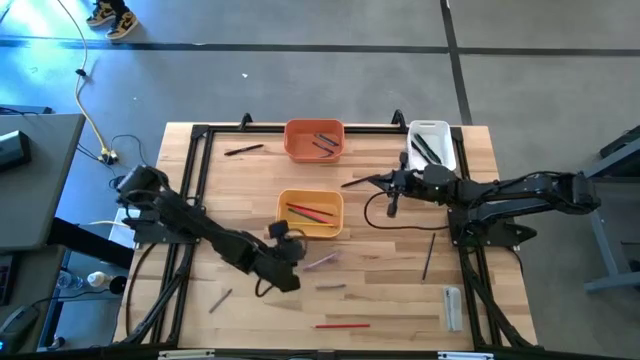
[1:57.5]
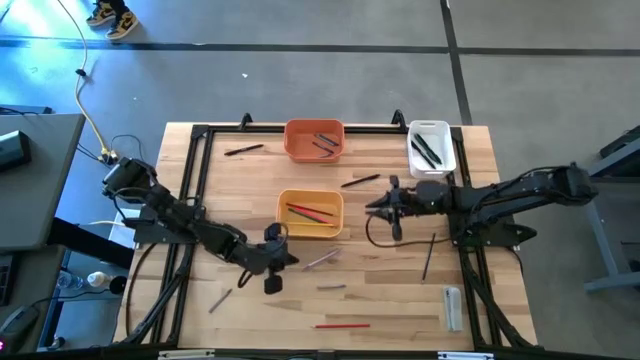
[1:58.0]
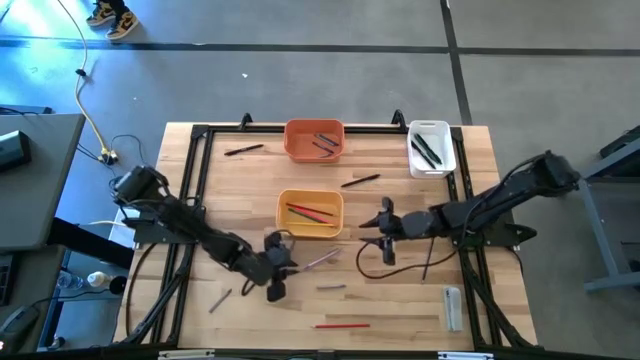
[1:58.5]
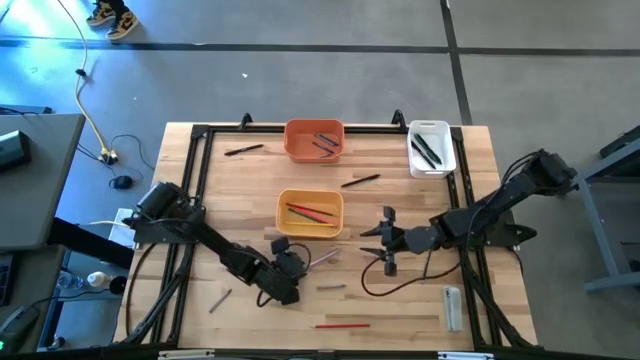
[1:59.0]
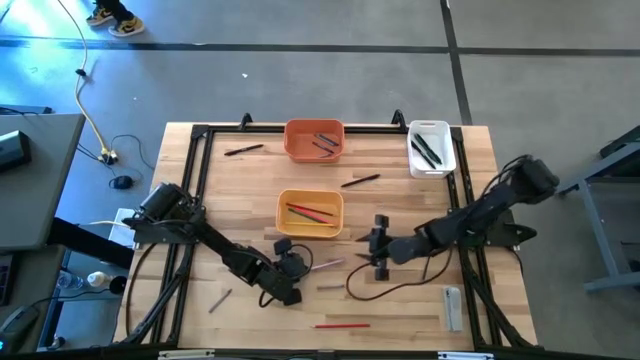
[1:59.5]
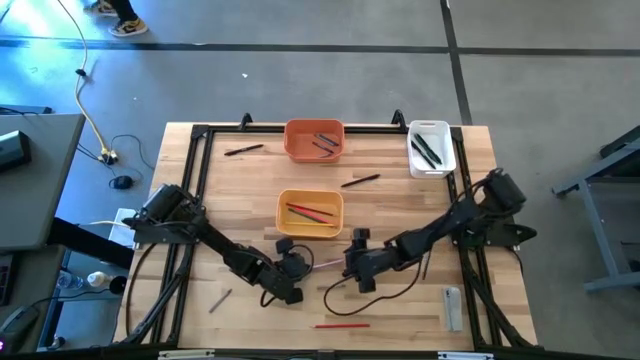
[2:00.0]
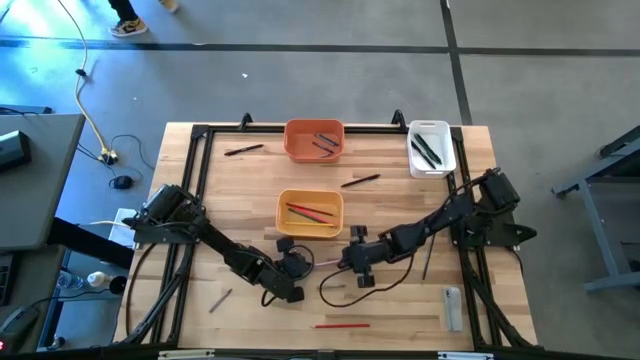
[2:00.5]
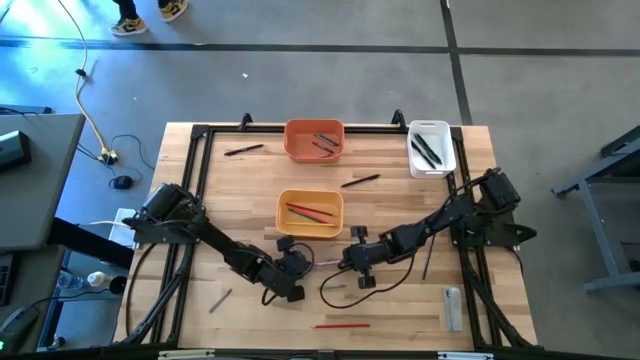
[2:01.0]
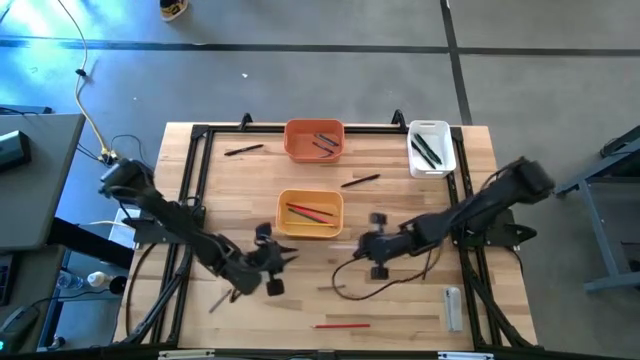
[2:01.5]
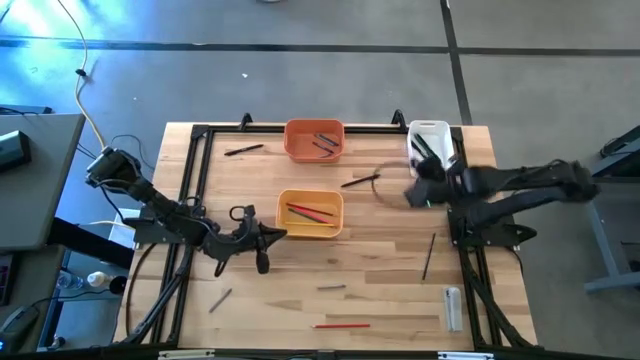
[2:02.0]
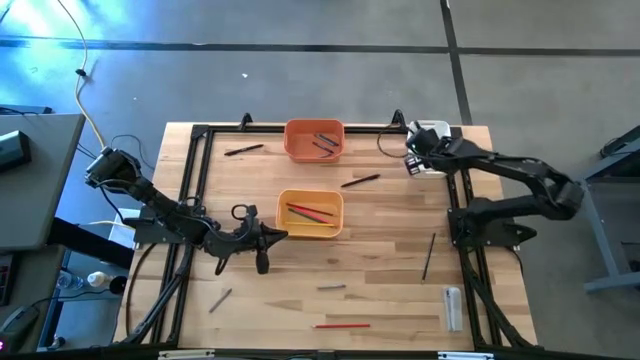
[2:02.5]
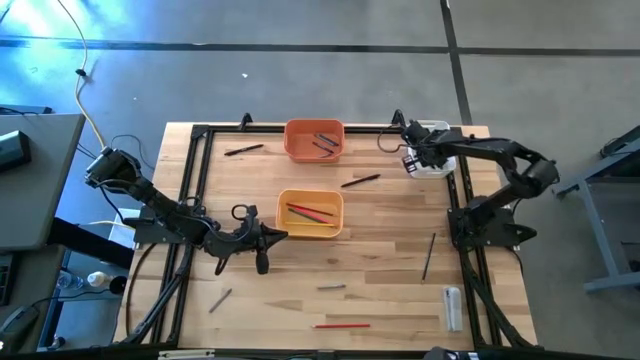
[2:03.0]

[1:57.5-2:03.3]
Task: Sort crayons/erasers/pens/pencils in bins
Put the purple pen into the white bin

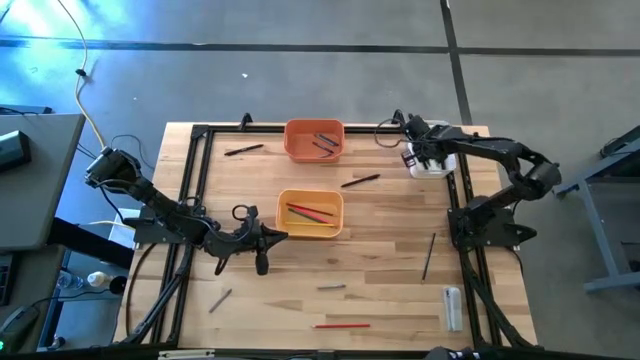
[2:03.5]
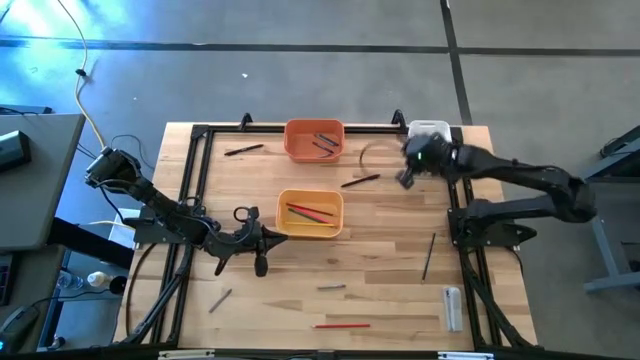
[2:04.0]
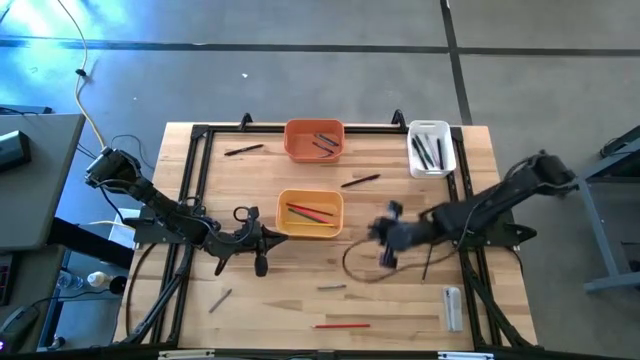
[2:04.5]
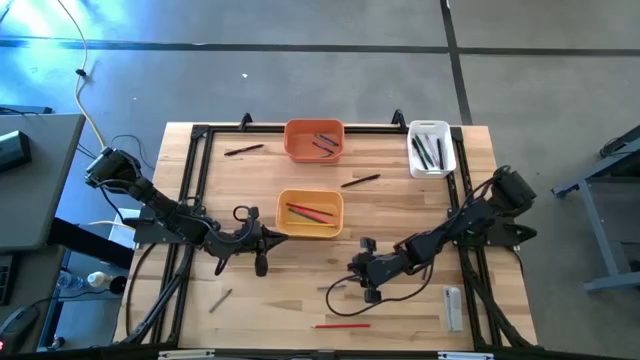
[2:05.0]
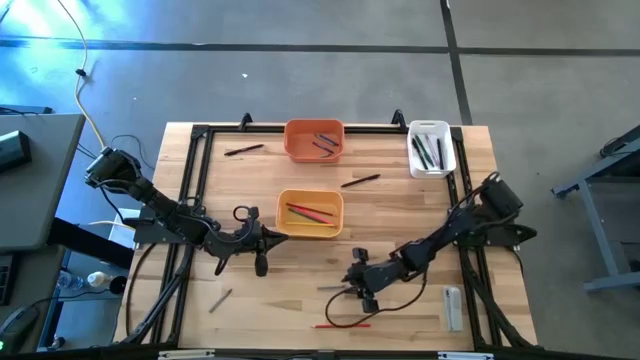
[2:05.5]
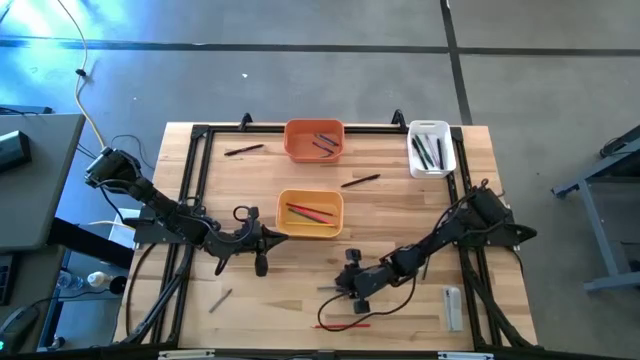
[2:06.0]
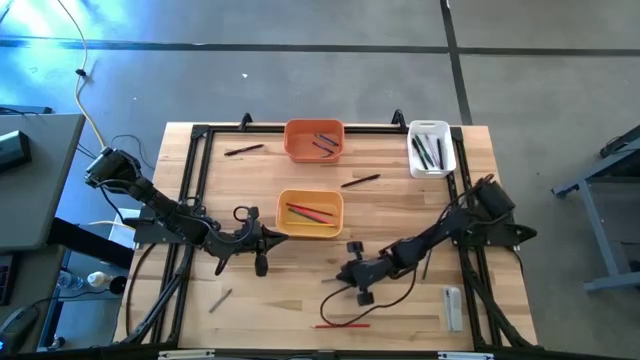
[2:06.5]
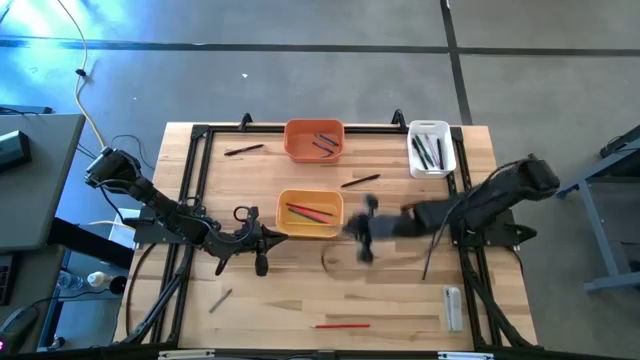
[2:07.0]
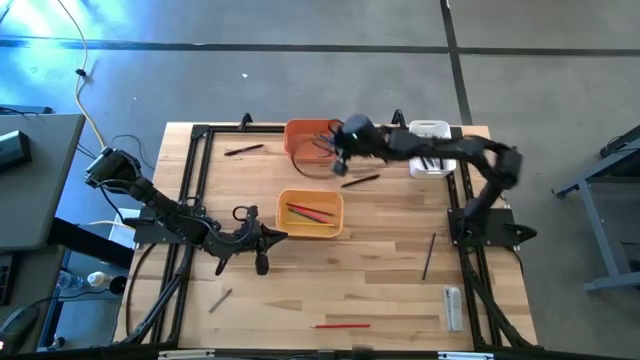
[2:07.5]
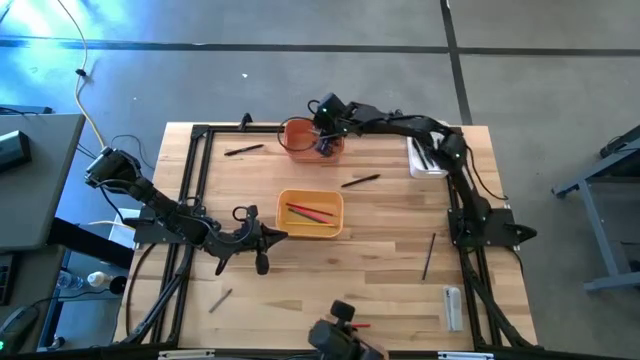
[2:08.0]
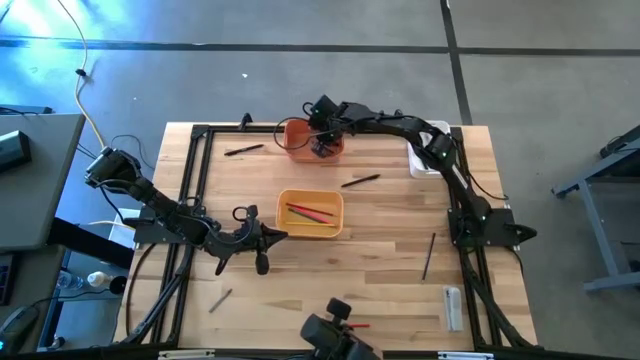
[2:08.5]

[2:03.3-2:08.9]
Put the right gray crayon into the orange bin

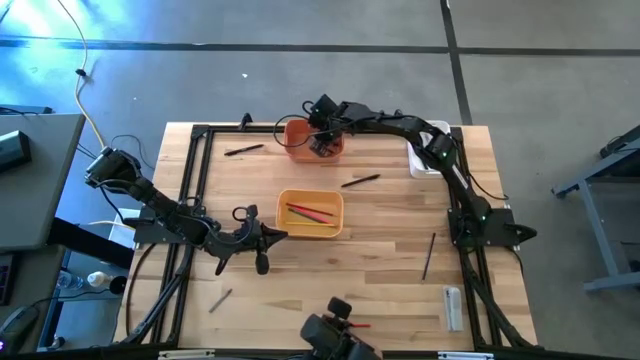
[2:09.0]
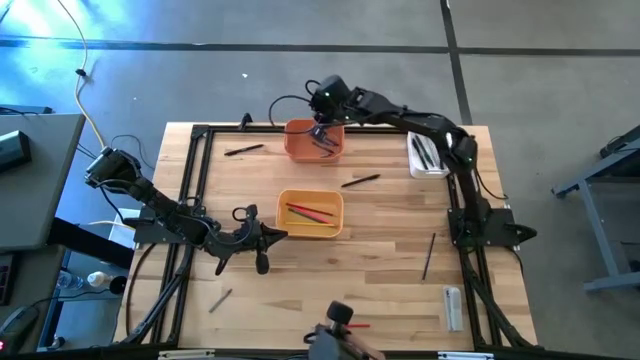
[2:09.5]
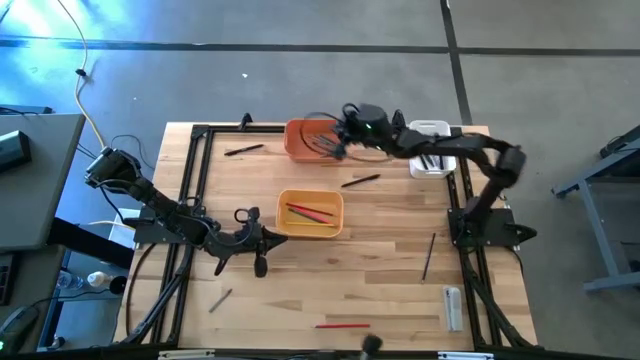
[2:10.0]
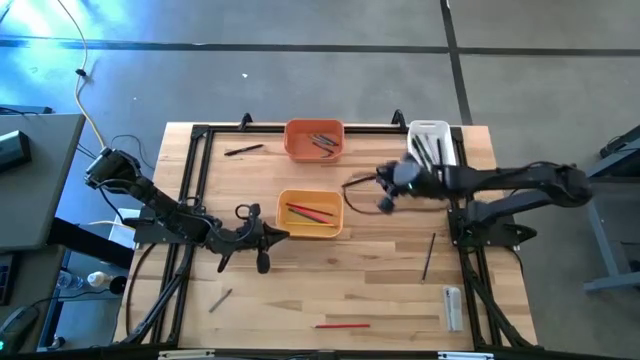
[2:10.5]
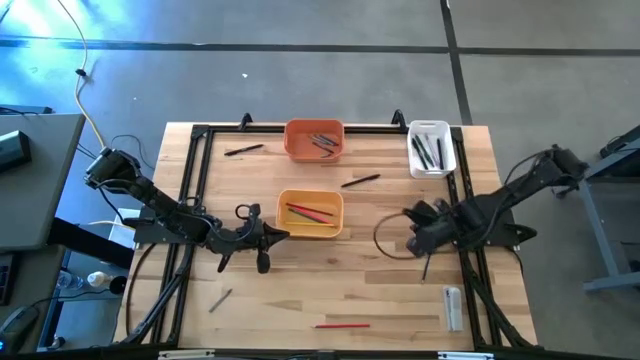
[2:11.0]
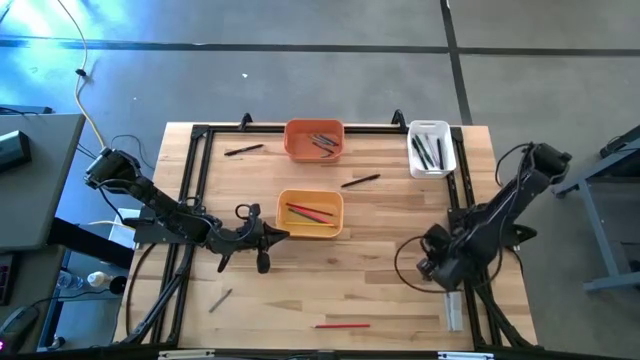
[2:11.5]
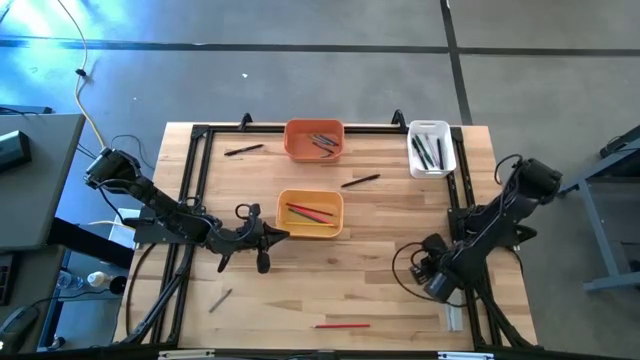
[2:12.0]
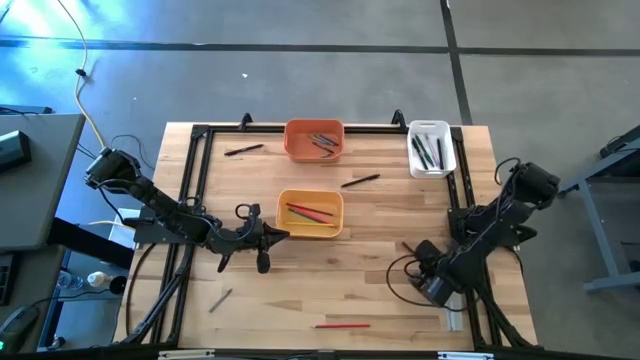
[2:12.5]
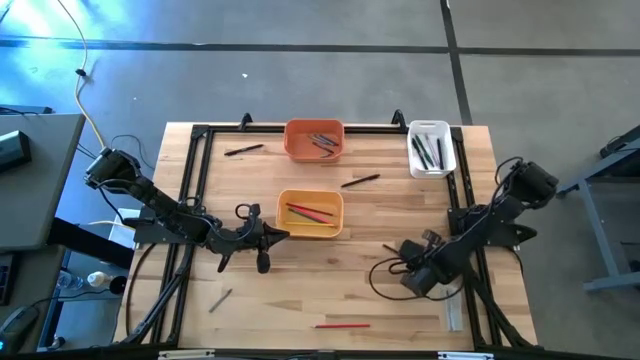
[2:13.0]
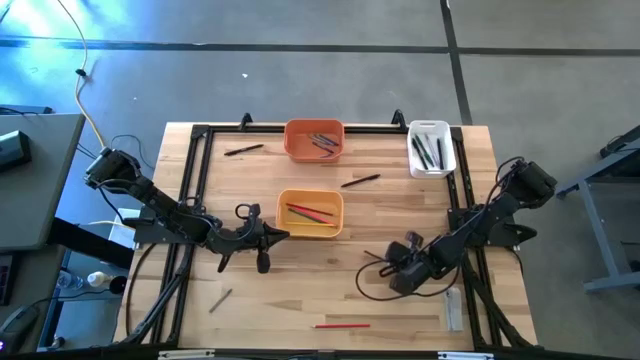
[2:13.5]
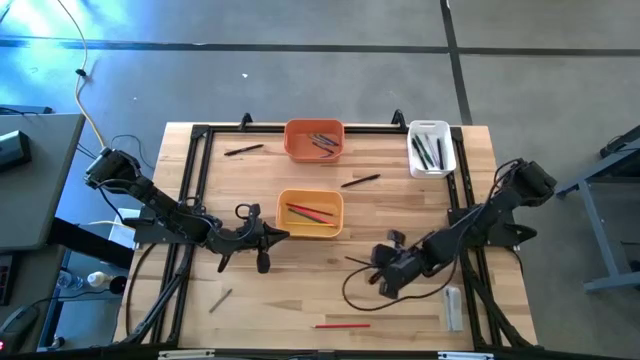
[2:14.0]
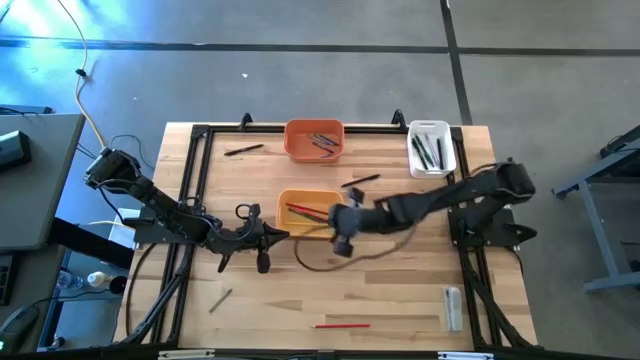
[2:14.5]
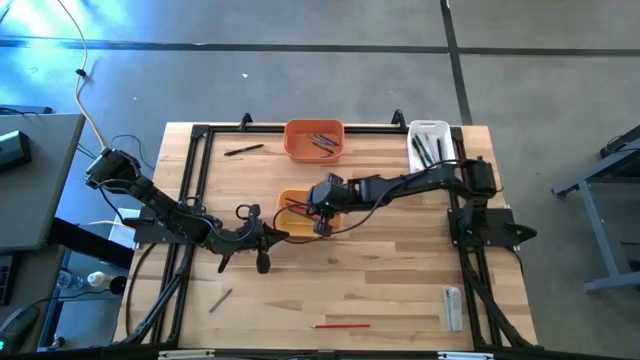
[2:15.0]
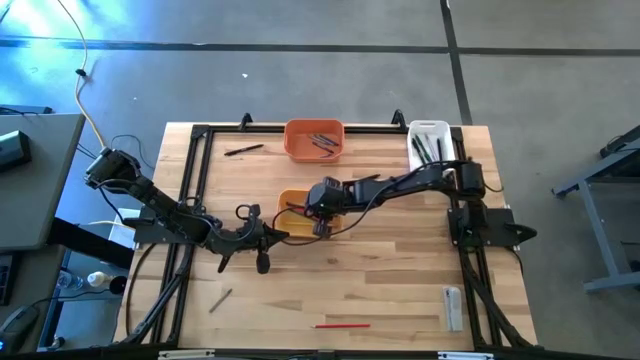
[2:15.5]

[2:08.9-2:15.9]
Put the blue pencil into the yellow bin

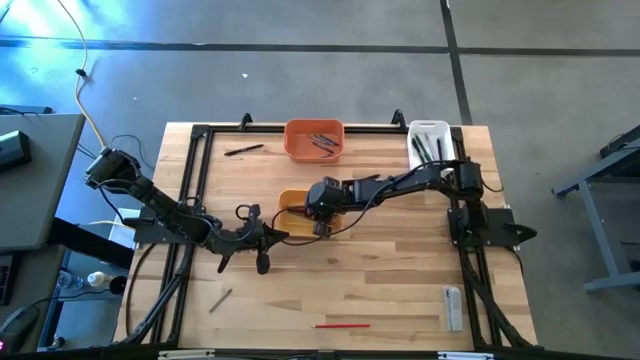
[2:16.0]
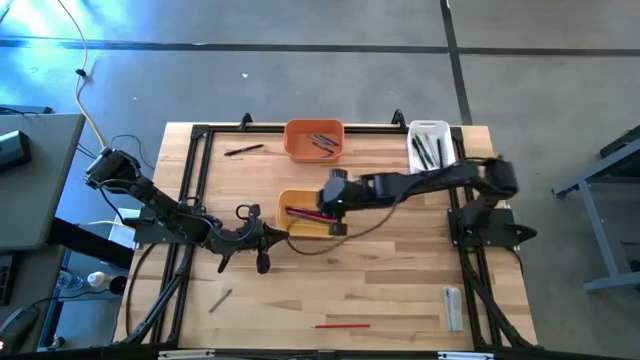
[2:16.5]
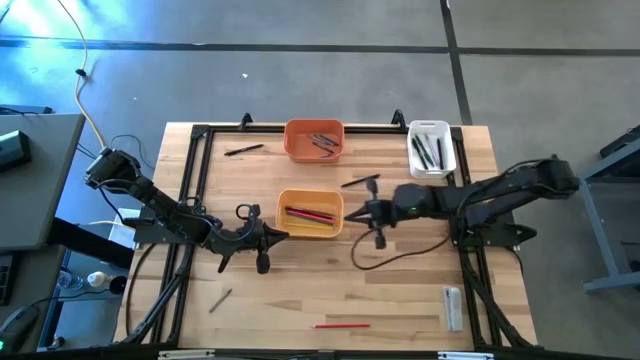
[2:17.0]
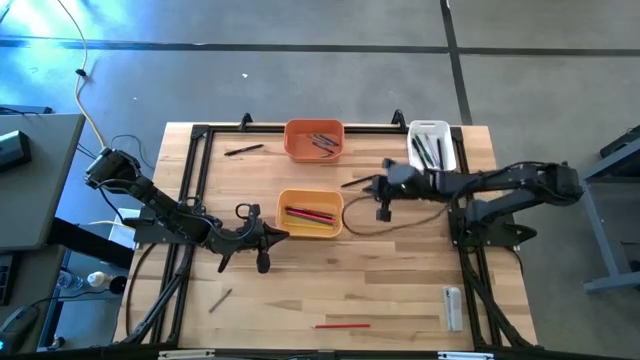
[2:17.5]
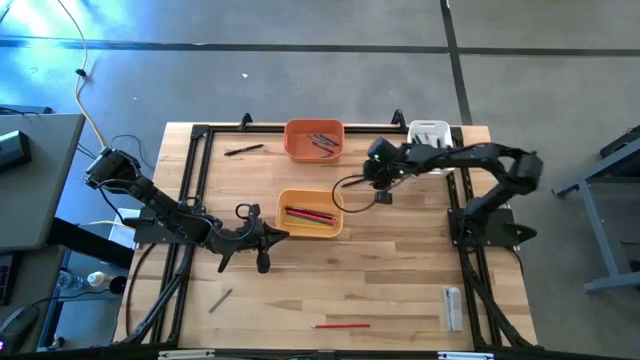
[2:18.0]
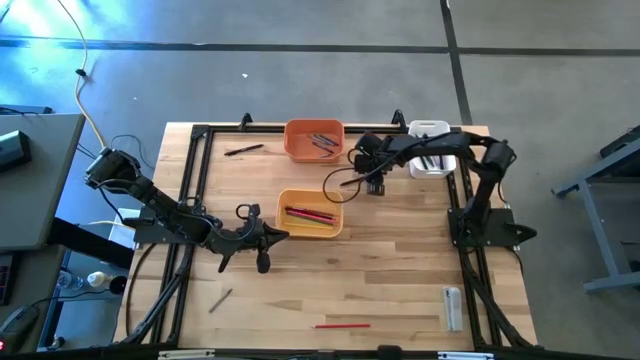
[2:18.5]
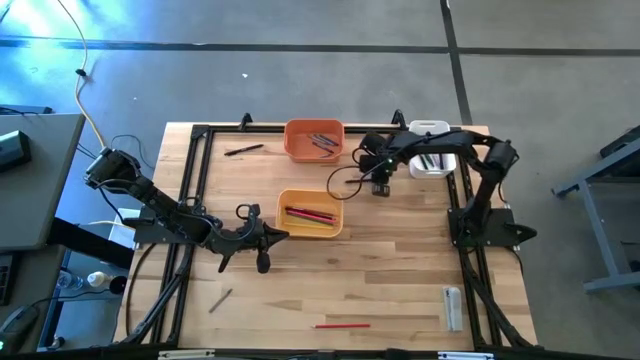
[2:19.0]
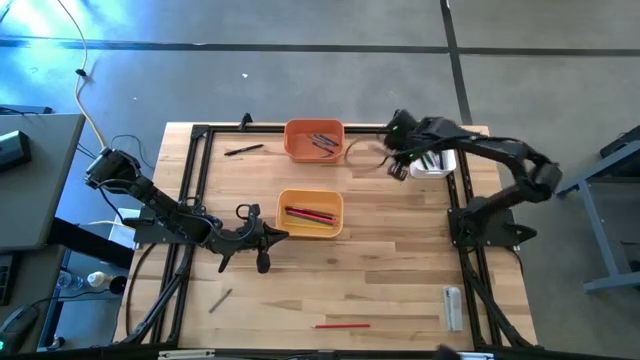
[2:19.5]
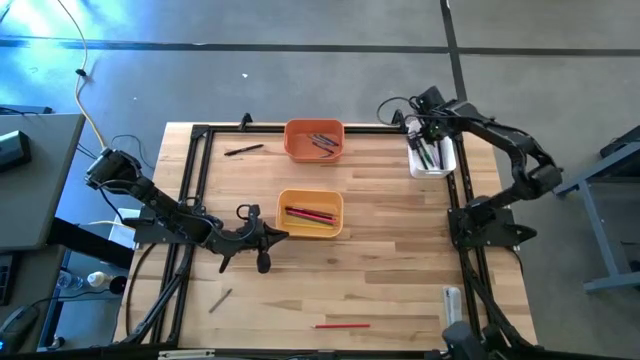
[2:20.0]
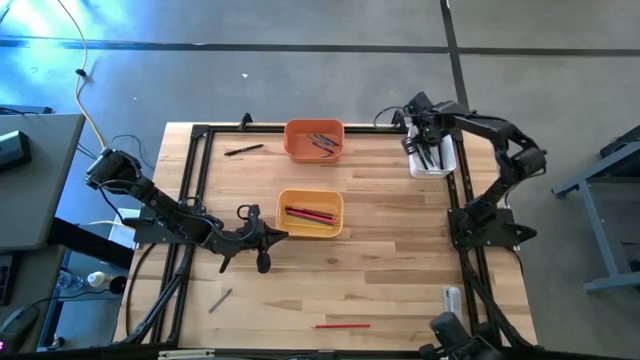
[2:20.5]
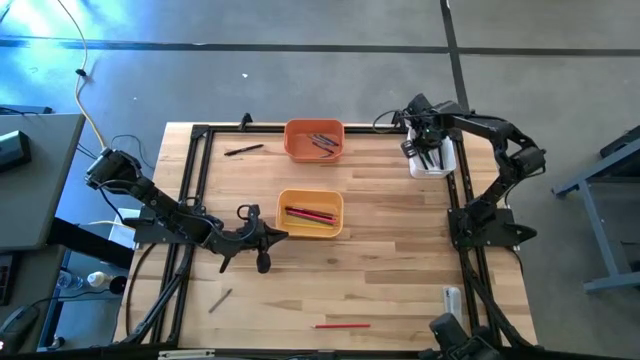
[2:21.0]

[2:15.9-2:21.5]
Put the right black pen into the white bin
